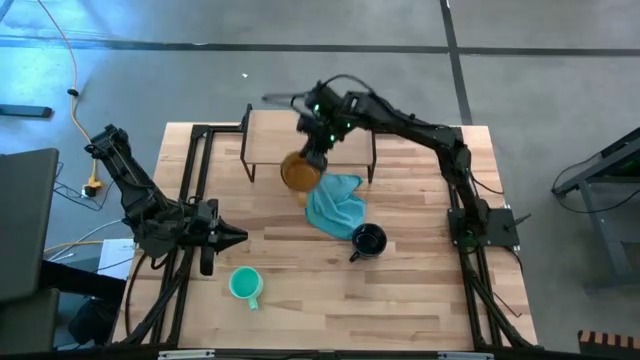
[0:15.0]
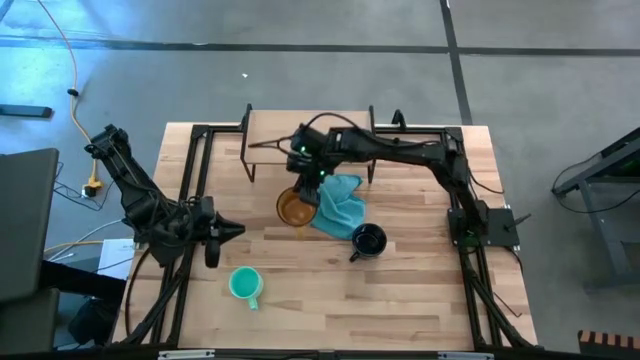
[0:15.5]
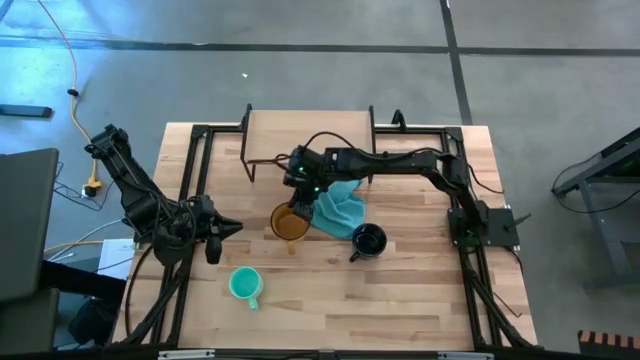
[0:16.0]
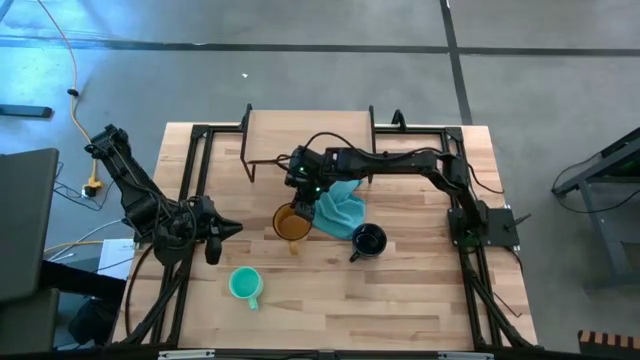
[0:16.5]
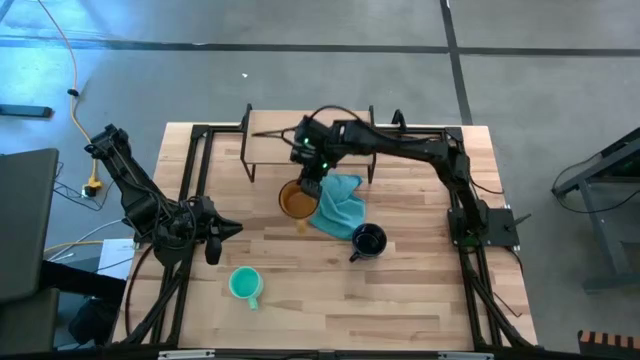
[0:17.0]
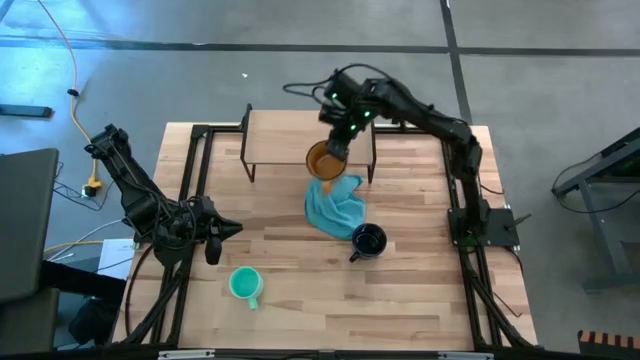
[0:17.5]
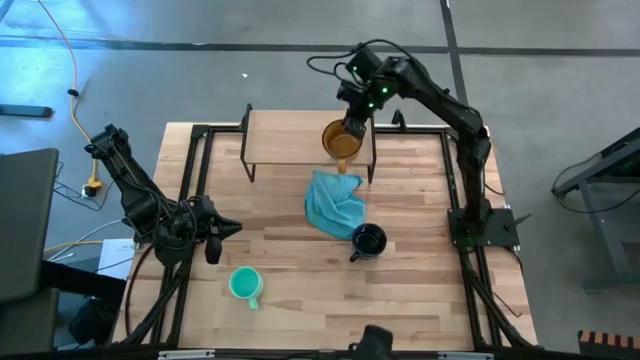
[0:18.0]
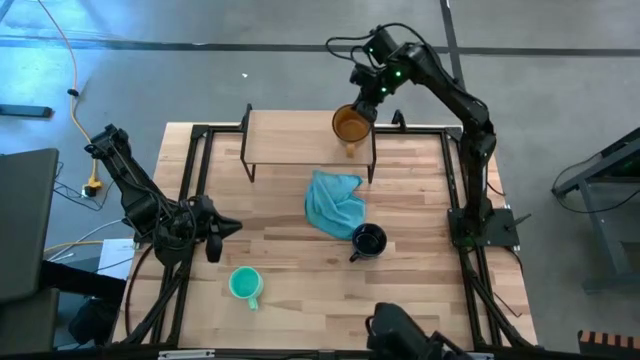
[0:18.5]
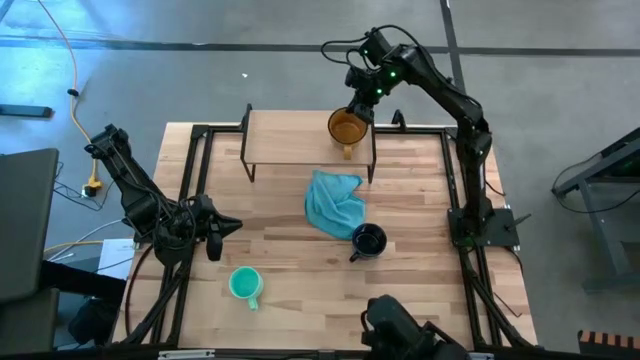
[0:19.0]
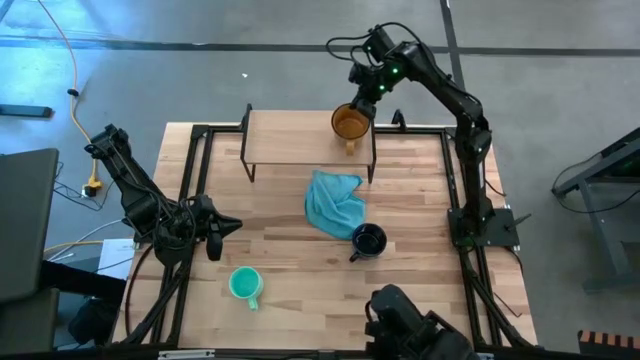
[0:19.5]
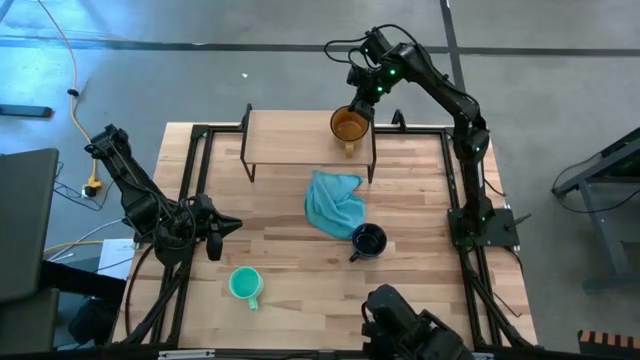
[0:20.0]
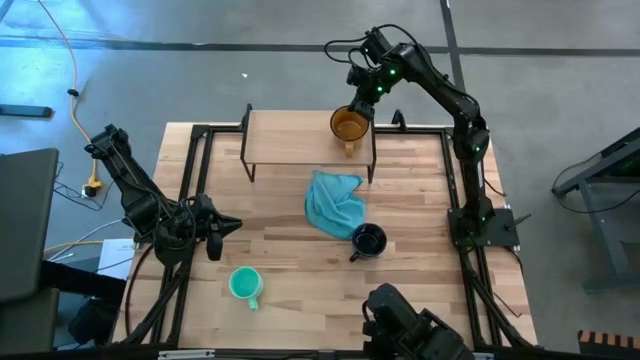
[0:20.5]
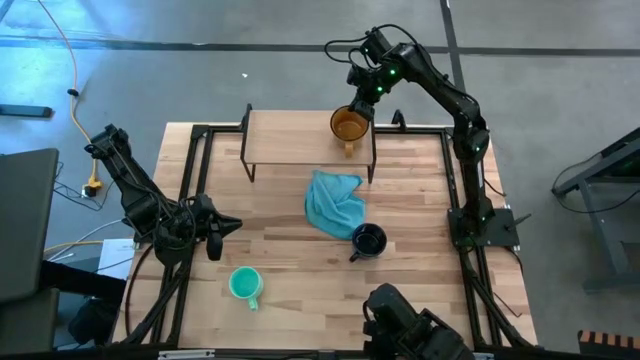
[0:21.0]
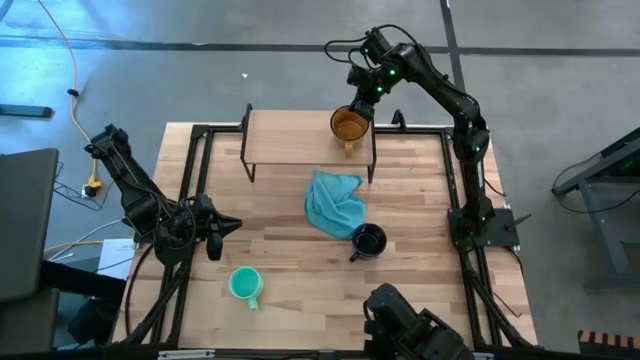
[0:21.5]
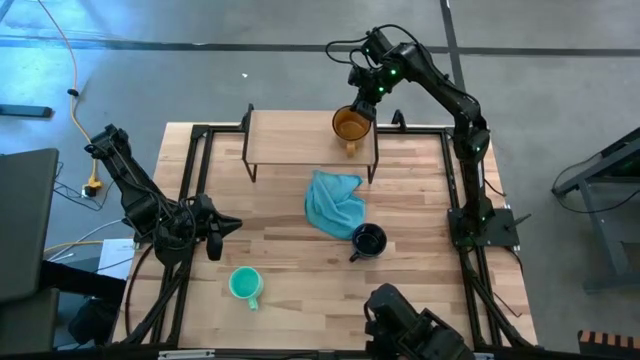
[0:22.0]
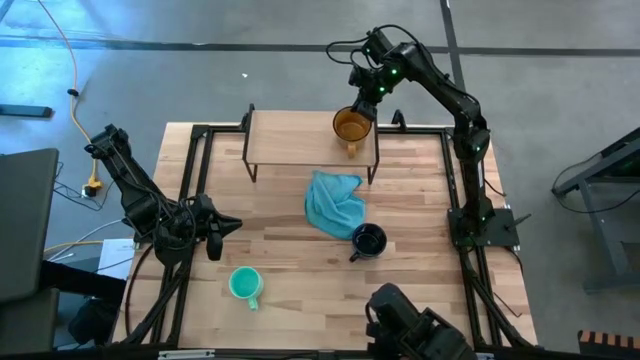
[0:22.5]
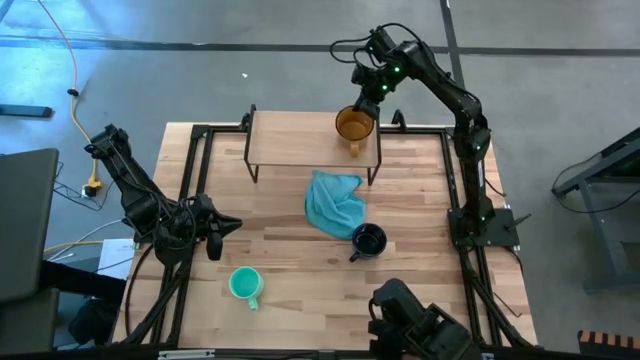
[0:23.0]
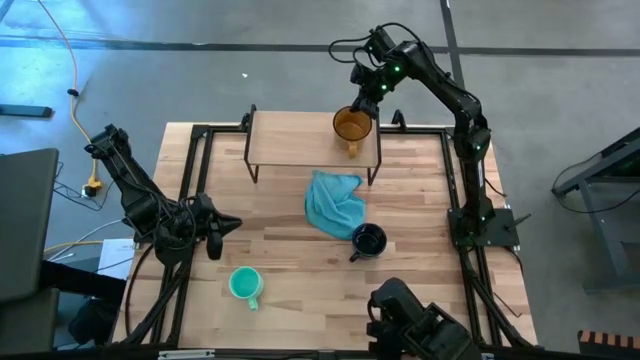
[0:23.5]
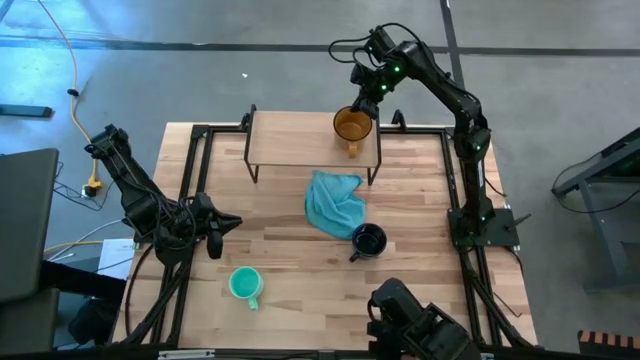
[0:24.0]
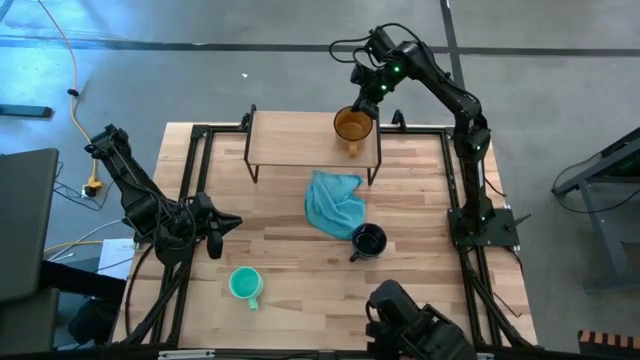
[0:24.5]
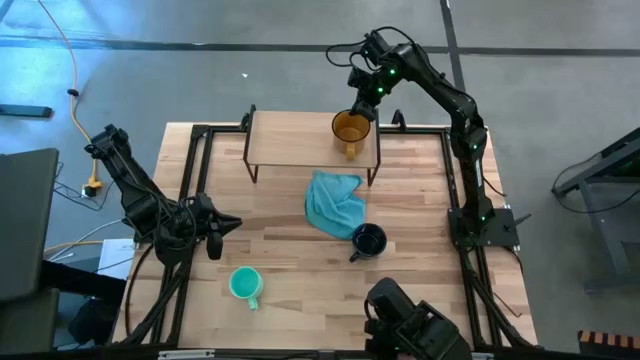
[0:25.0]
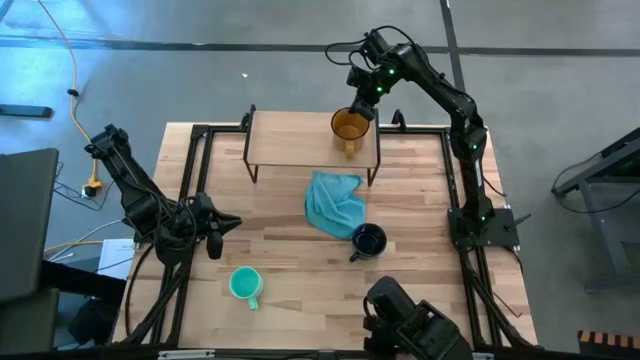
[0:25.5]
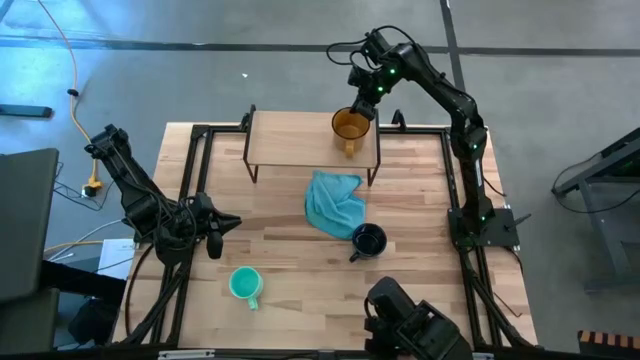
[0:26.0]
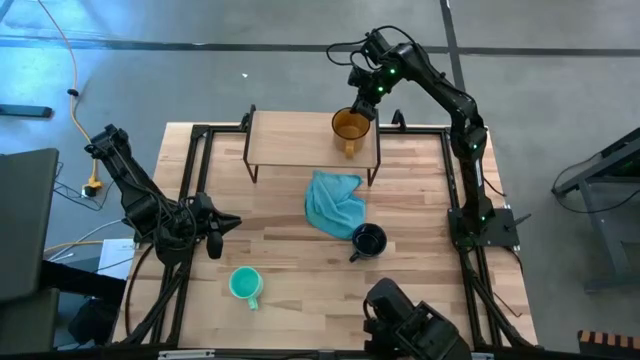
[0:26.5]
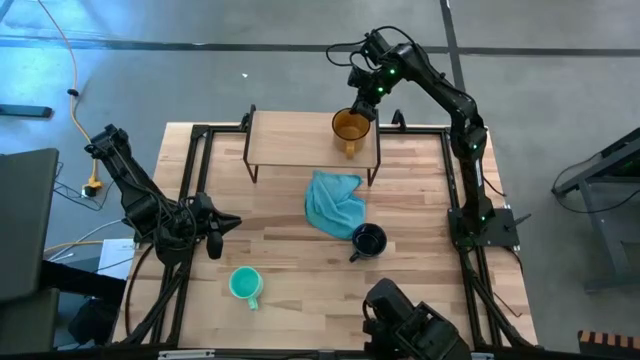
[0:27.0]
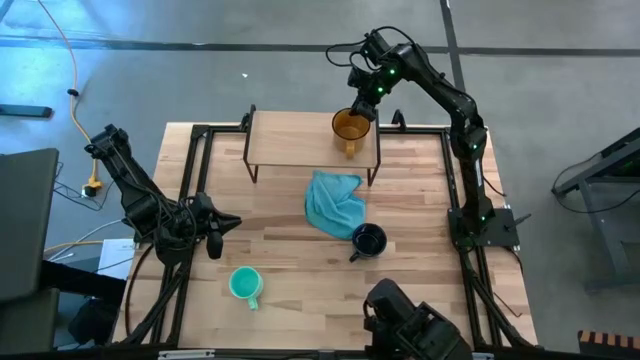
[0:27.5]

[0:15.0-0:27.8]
Task: Stack small to large cups/mugs on shelf
Put the yellow mug on the shelf

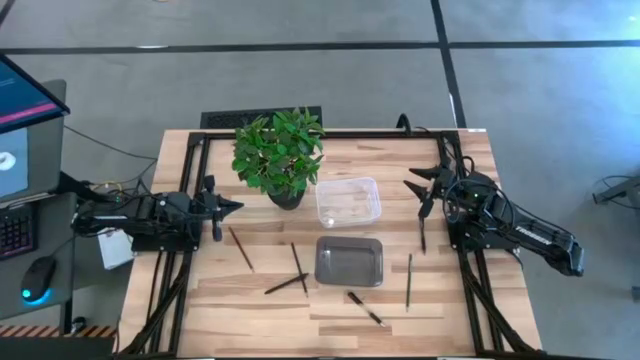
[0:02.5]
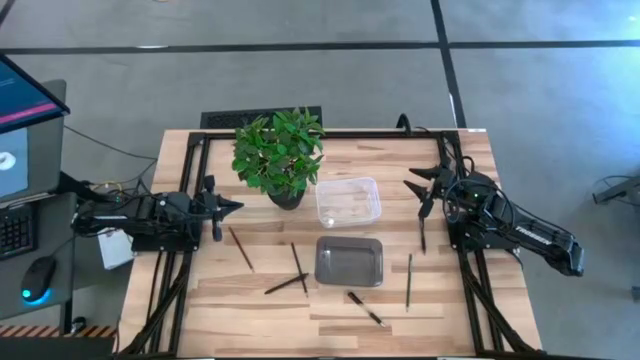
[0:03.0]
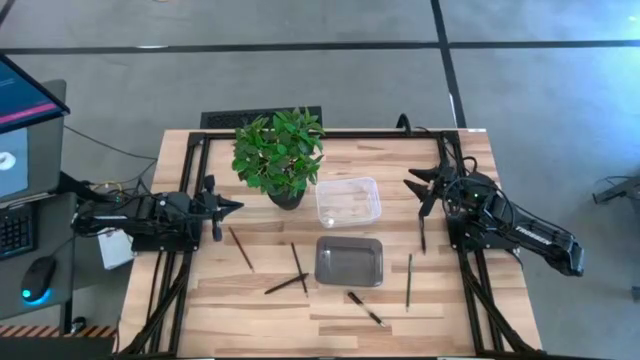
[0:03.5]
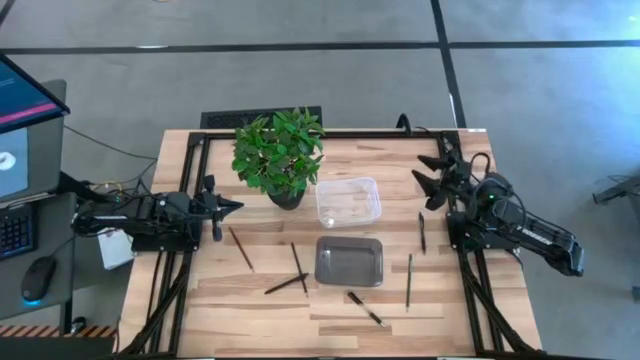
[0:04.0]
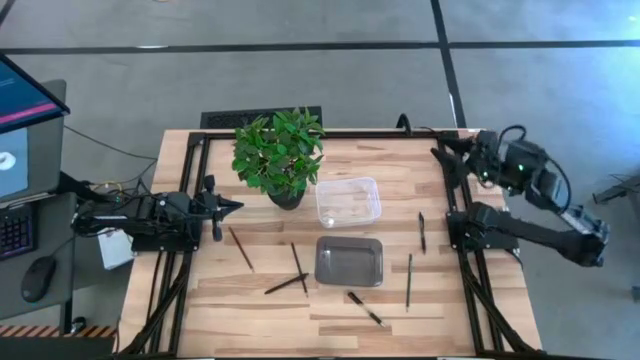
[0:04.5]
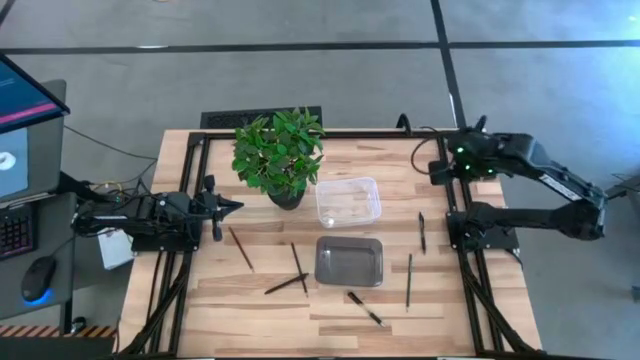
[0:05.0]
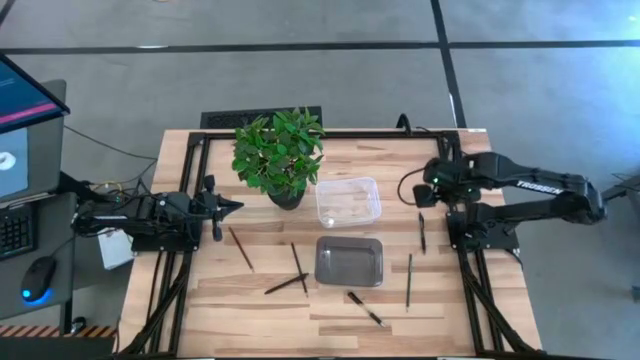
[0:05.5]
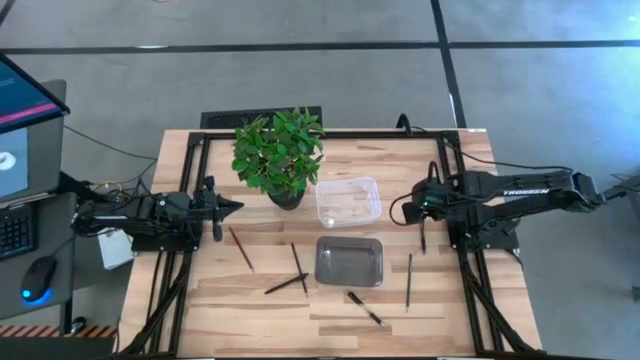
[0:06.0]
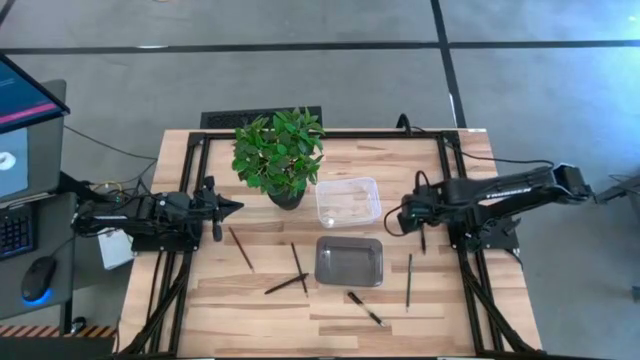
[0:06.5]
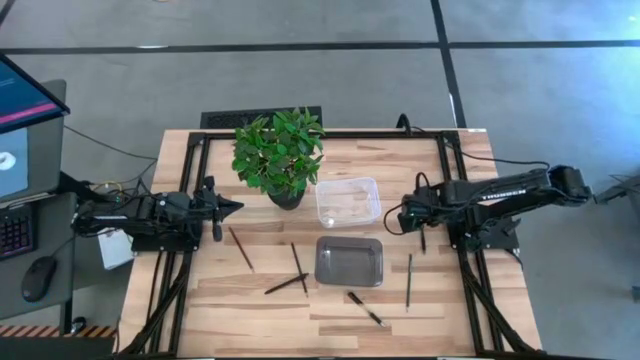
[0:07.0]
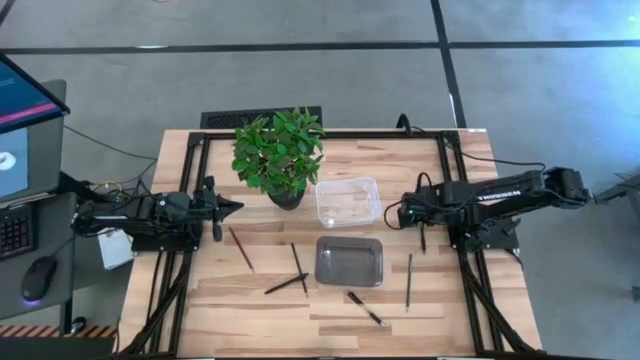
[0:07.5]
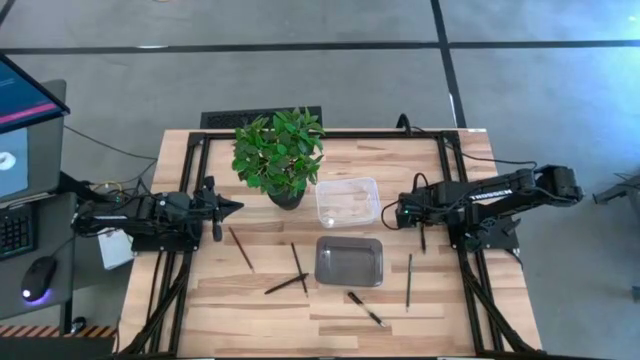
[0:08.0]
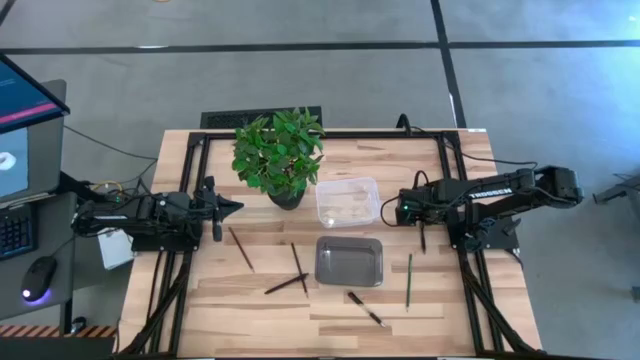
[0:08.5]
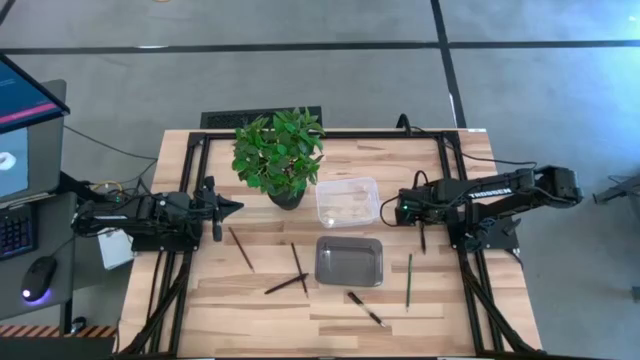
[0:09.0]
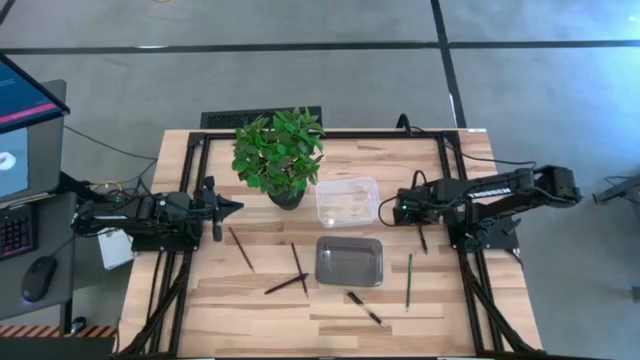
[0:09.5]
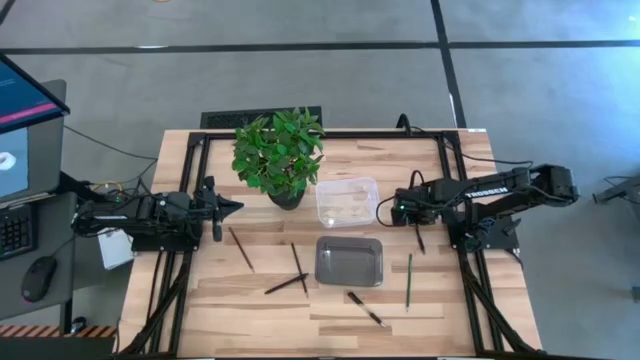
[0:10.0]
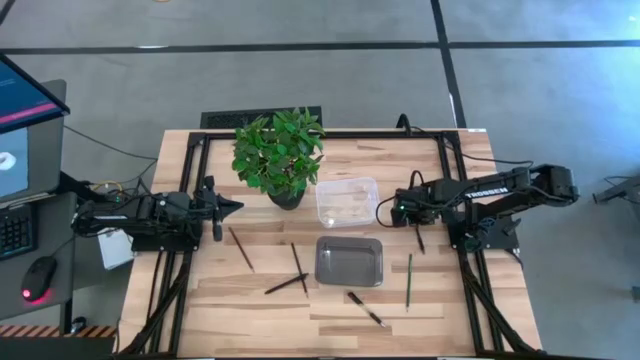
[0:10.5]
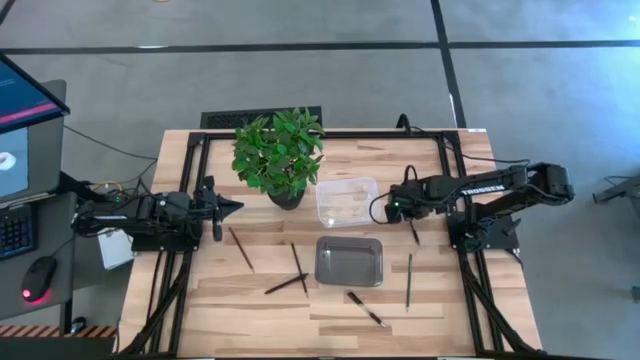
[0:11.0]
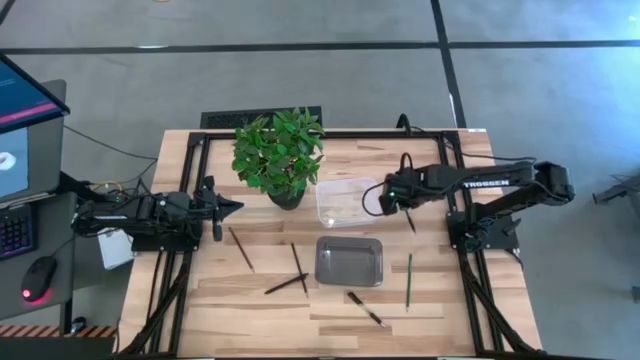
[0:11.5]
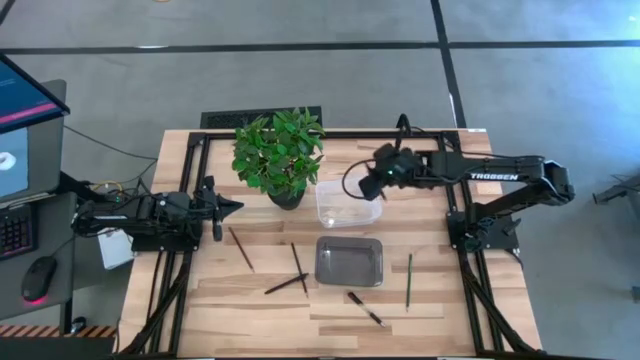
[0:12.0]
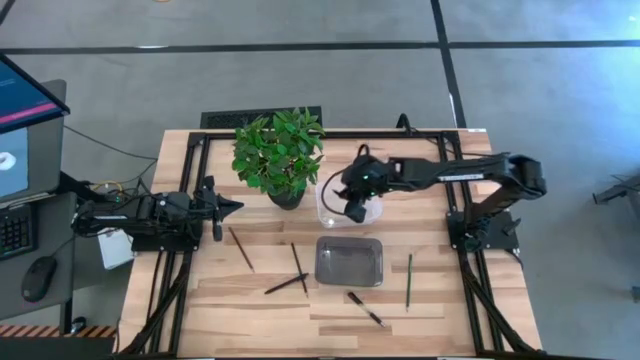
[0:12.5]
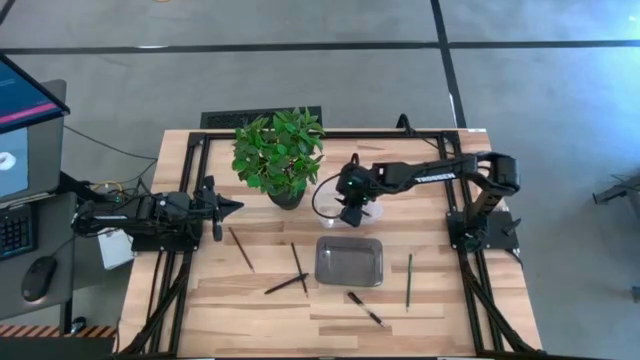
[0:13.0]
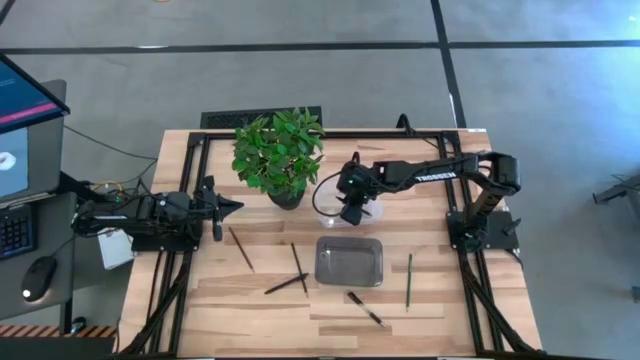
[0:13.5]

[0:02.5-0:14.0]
Task: Sort pens & pencils
Put the top right black pen into the transparent bin
